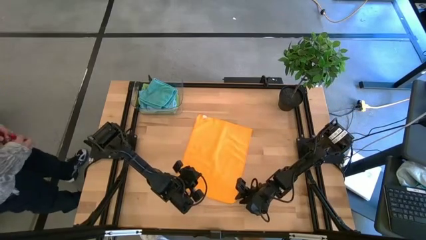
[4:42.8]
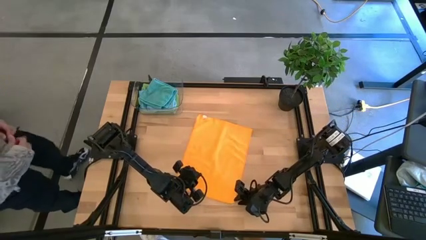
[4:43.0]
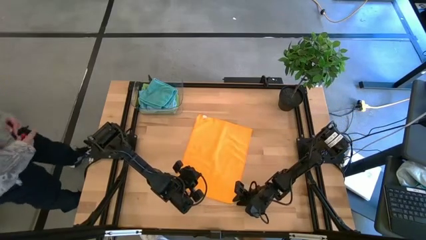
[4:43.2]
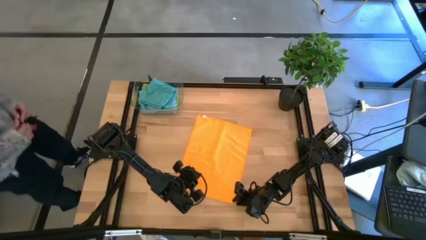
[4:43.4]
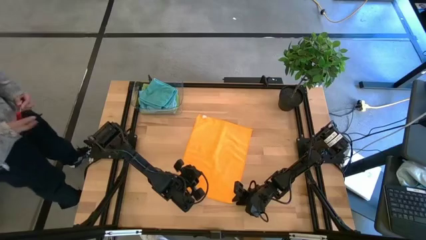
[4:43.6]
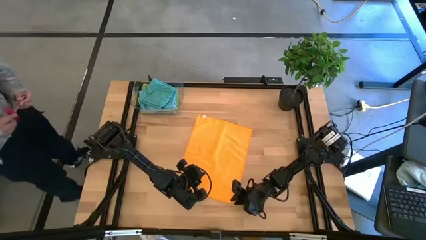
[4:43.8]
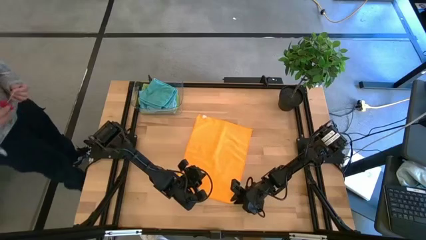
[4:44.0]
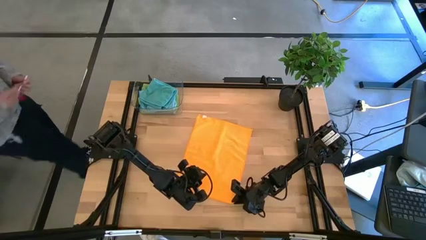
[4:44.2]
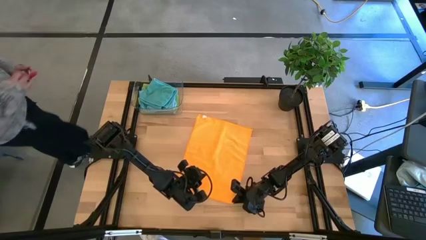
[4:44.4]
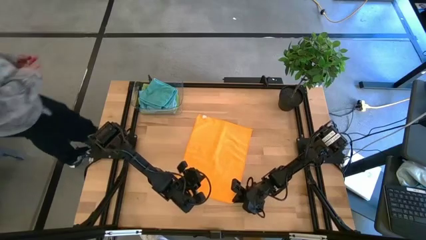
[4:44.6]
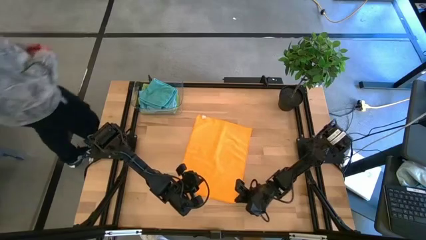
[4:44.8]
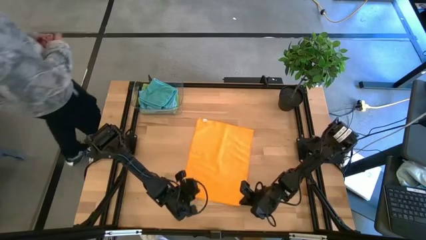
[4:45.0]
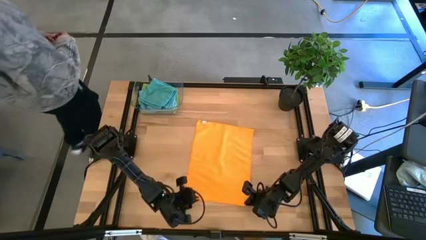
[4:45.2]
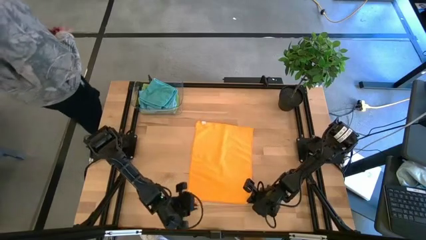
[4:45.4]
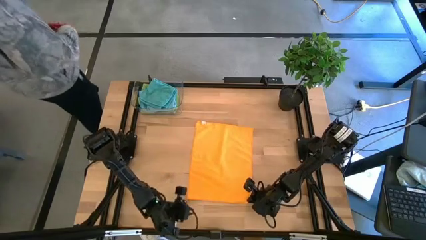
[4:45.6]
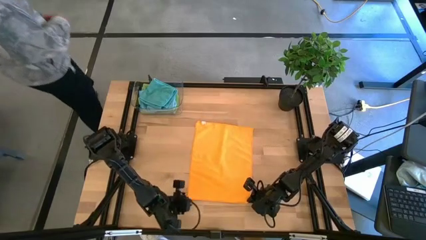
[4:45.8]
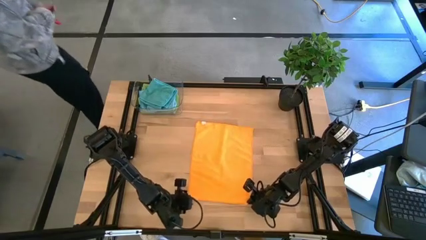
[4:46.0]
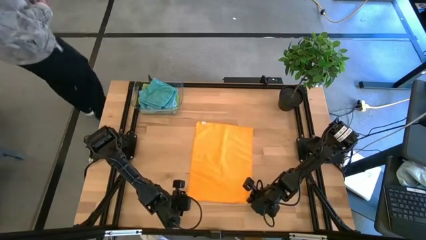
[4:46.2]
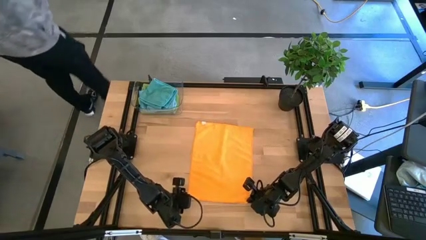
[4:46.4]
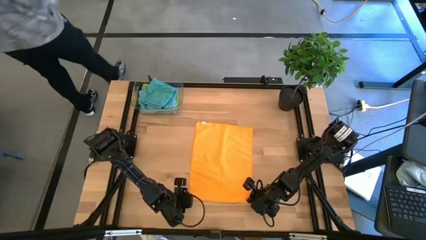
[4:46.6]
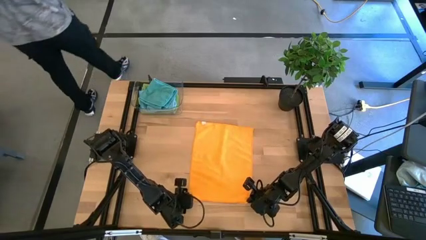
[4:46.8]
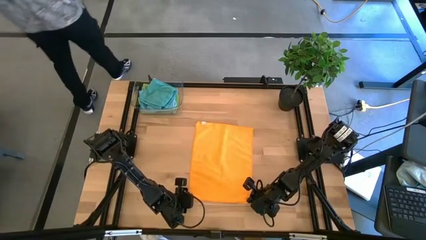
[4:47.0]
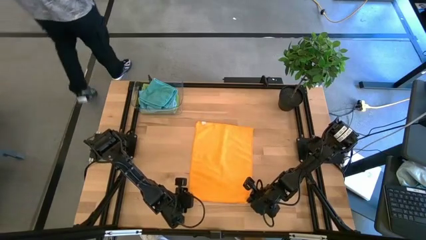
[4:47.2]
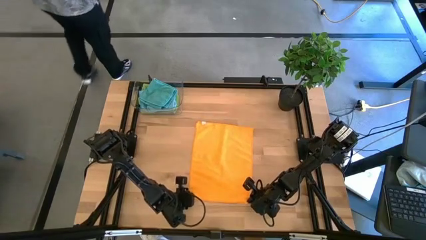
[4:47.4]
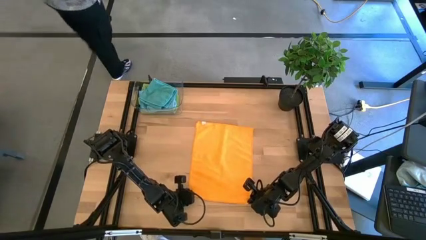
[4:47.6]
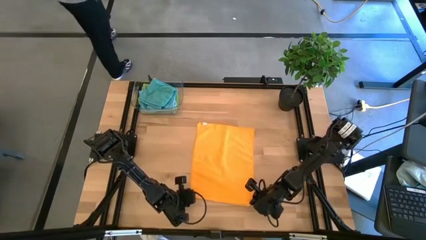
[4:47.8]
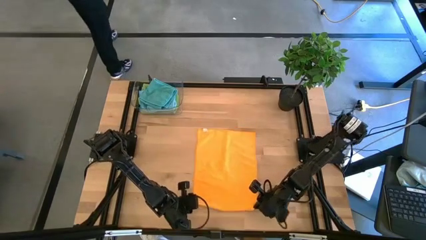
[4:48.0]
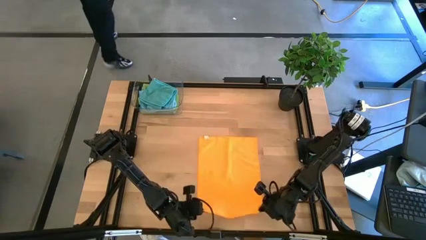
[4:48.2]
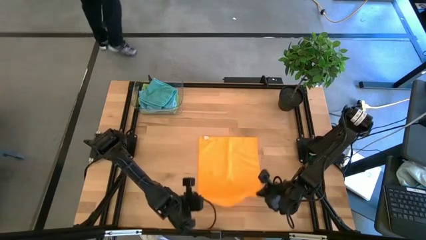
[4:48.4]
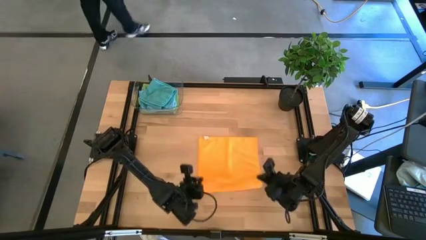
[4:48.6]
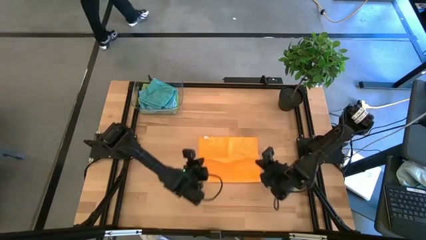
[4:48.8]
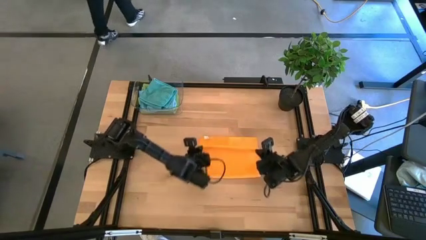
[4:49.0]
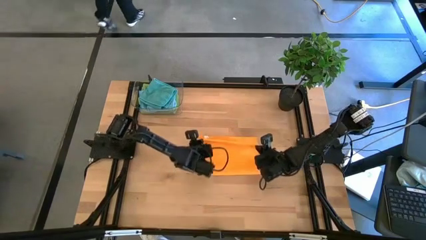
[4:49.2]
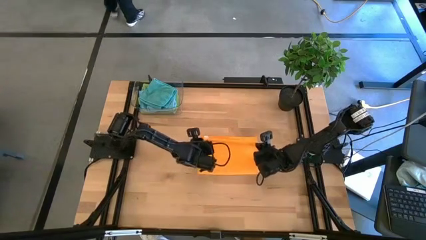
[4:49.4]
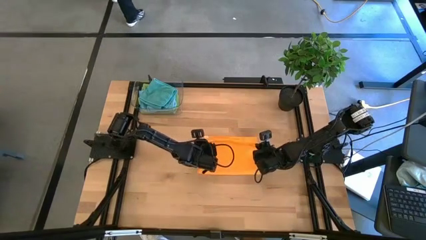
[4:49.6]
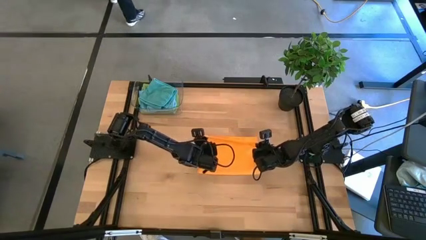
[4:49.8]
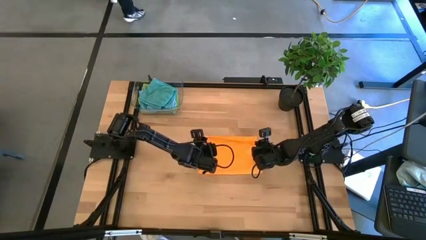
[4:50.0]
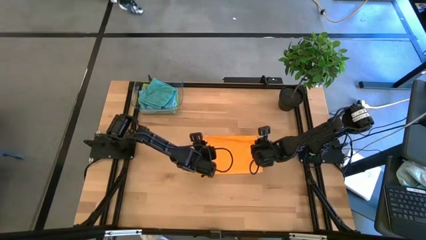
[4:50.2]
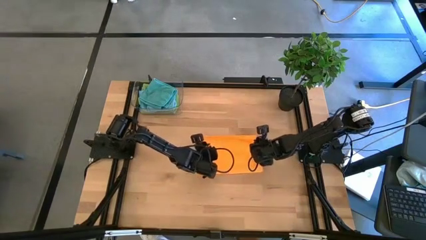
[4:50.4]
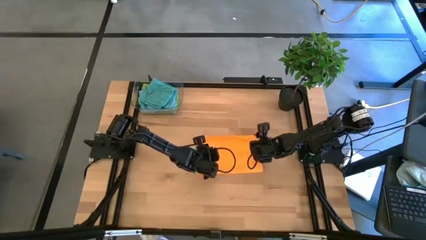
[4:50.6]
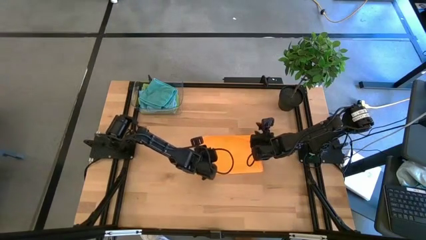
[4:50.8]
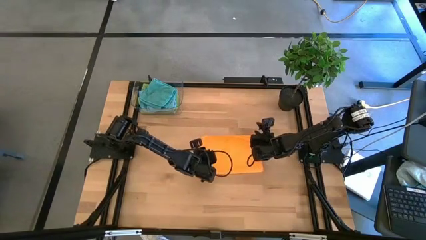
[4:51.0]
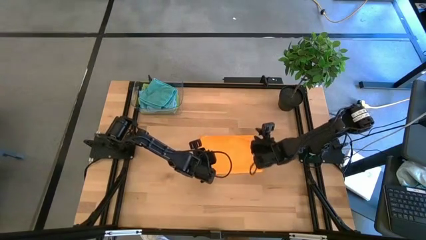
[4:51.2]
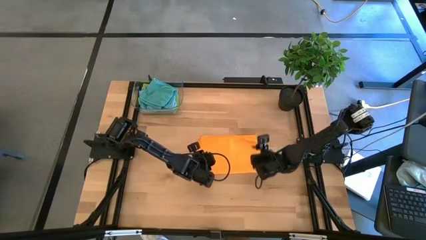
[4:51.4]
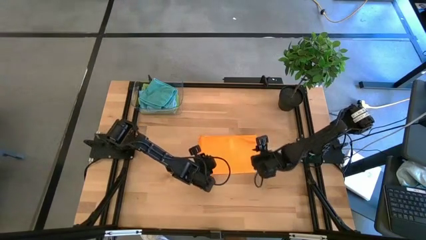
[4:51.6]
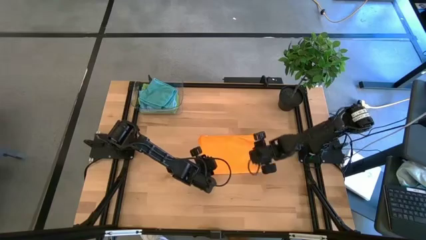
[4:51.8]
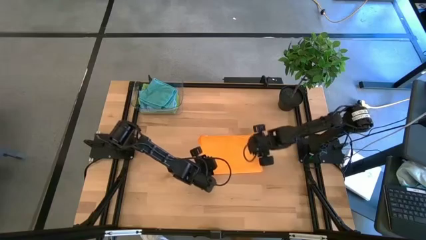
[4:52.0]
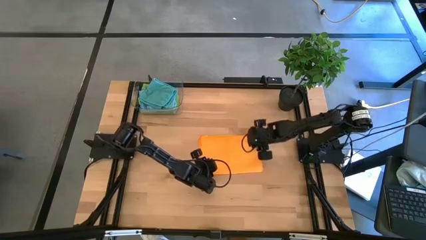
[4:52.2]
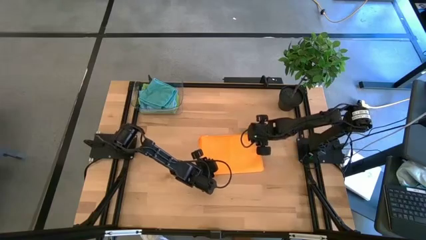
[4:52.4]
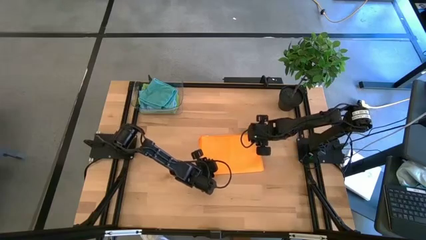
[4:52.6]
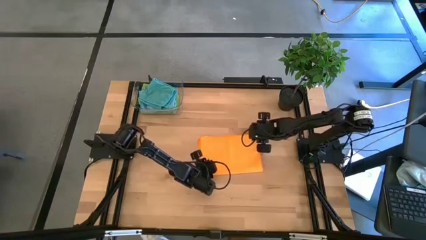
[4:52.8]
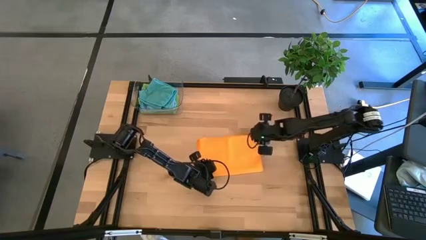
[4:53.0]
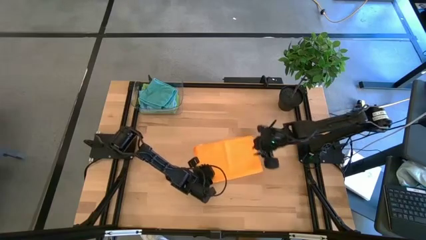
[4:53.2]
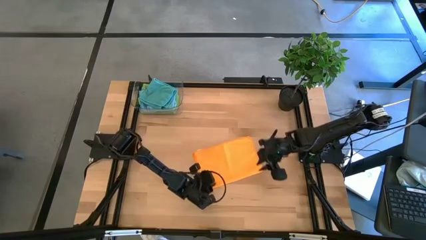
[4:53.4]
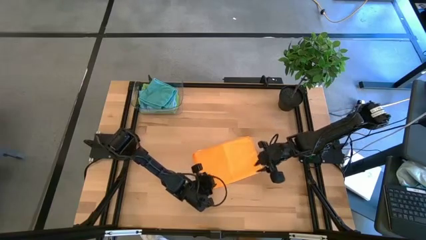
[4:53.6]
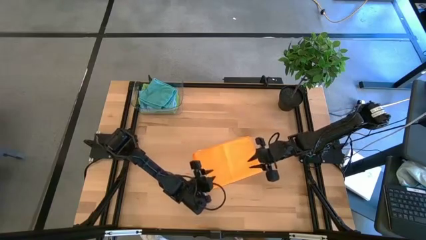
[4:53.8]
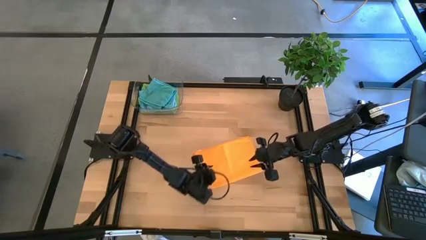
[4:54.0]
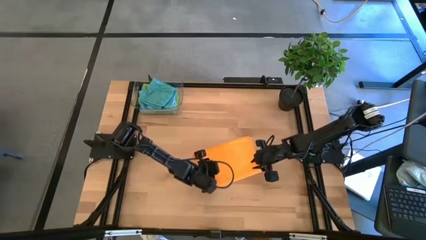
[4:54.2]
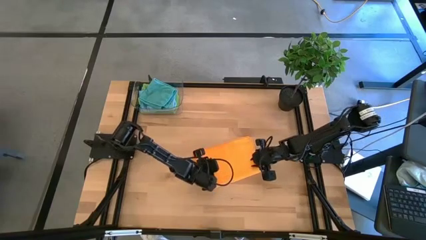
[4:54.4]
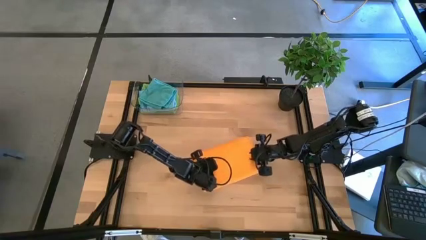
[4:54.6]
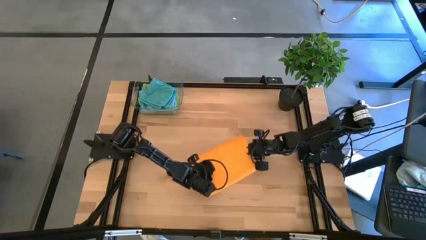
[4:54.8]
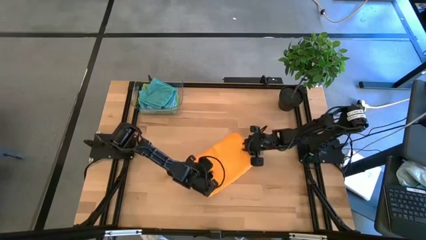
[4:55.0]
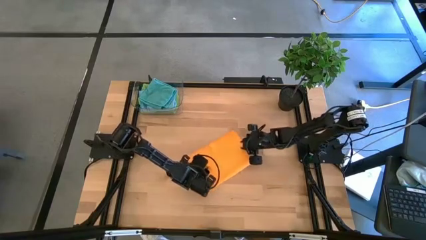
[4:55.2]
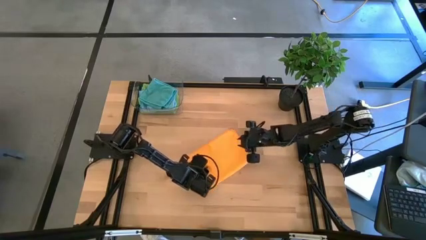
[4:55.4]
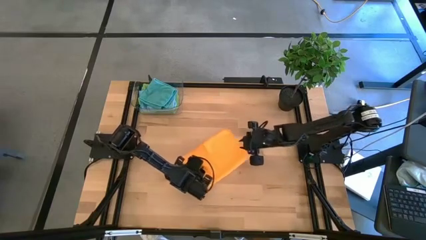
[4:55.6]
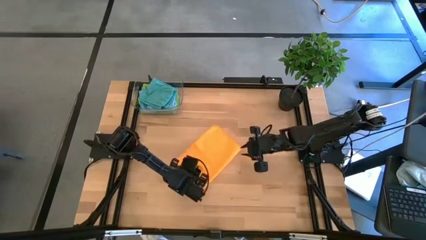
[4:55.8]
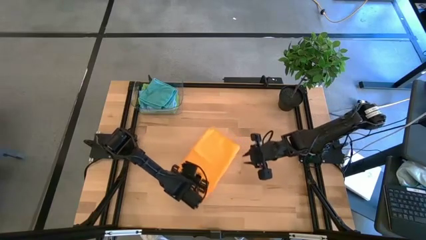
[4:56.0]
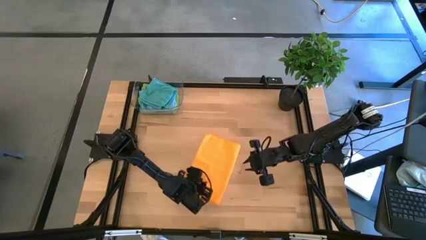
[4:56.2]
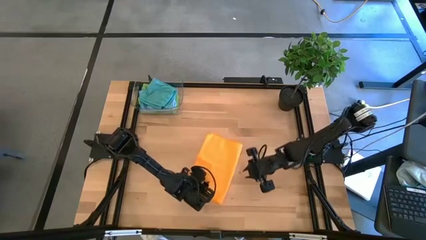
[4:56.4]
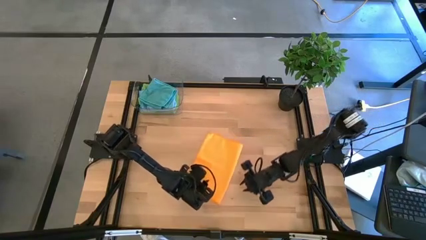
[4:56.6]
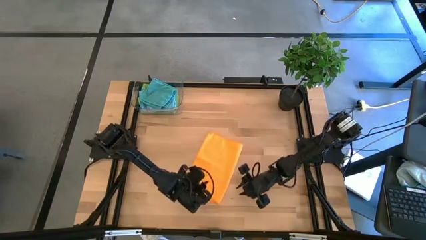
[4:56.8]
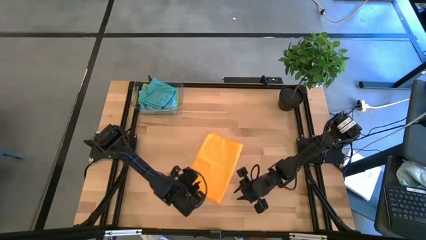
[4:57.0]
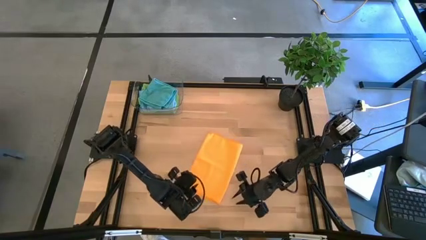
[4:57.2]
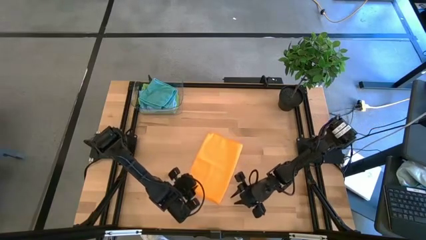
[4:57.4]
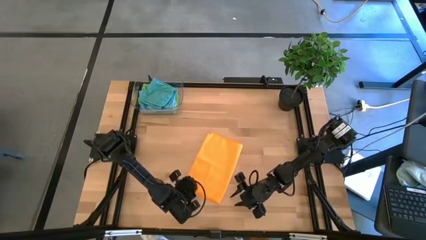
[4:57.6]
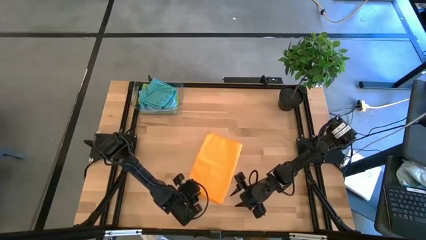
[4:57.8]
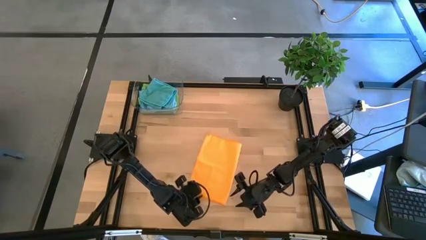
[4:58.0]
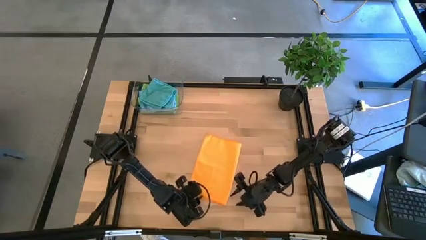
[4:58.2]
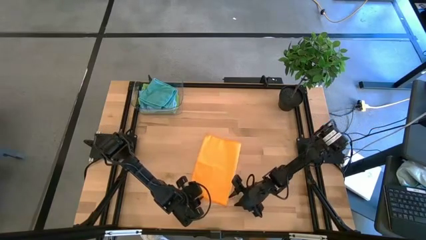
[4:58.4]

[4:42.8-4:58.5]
Task: Fold microfiber towels
Fold the orange microfiber cloth
